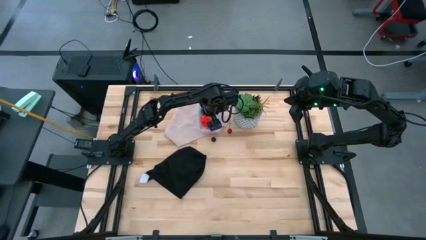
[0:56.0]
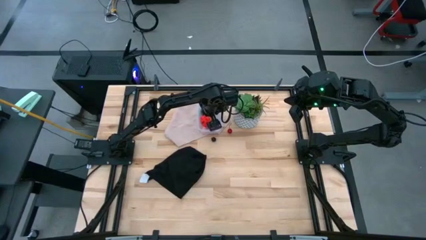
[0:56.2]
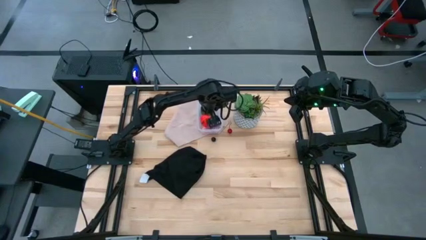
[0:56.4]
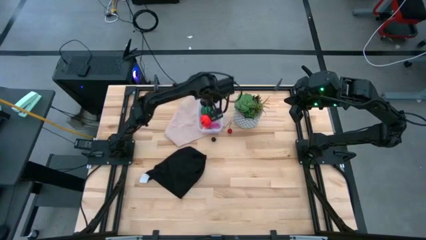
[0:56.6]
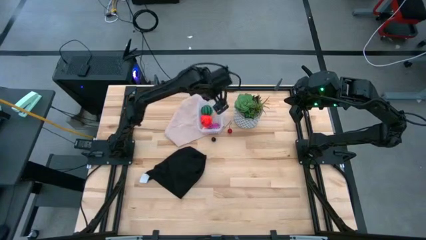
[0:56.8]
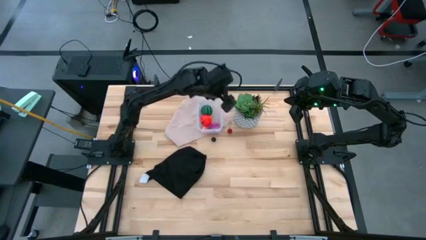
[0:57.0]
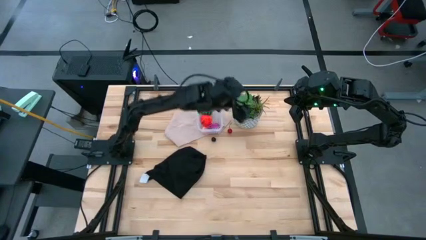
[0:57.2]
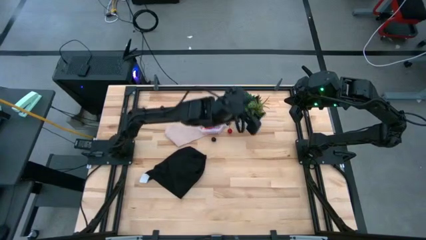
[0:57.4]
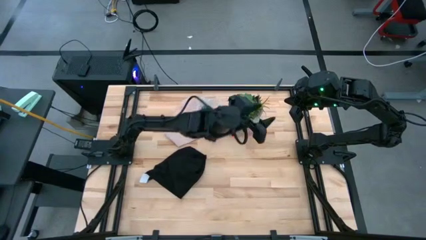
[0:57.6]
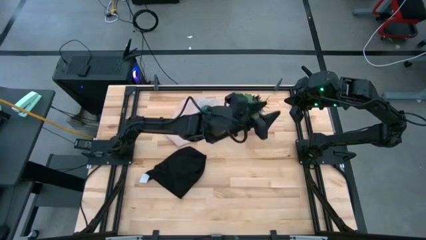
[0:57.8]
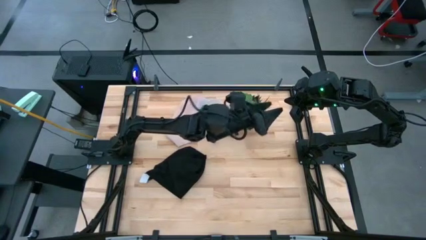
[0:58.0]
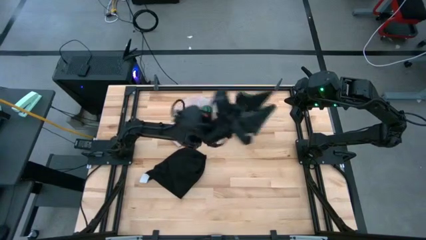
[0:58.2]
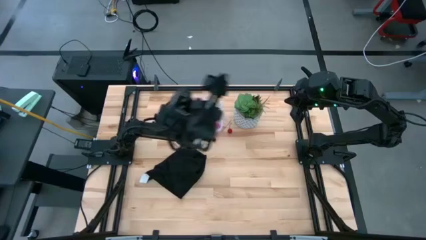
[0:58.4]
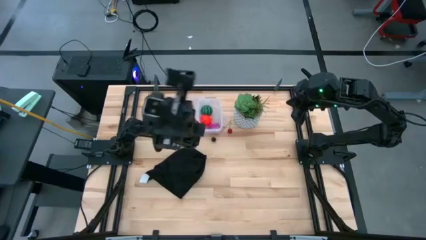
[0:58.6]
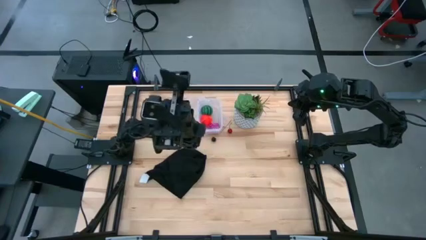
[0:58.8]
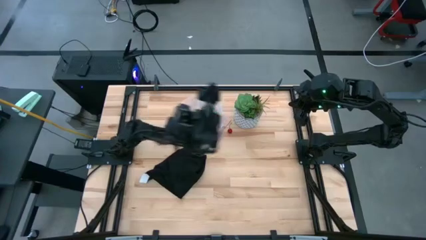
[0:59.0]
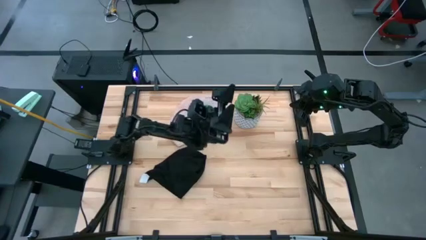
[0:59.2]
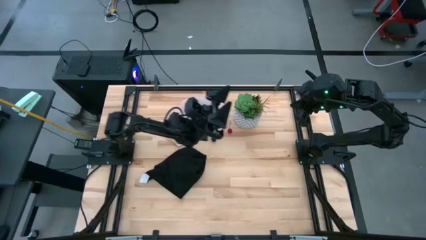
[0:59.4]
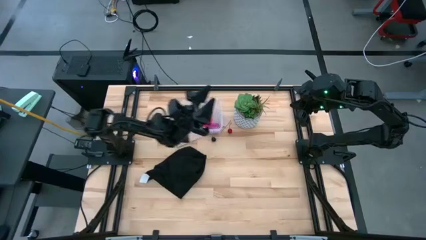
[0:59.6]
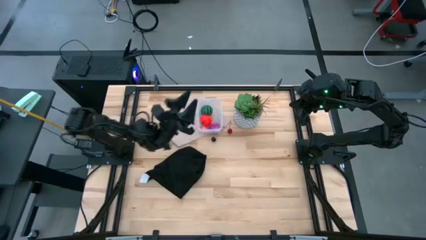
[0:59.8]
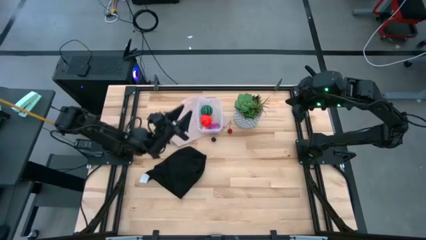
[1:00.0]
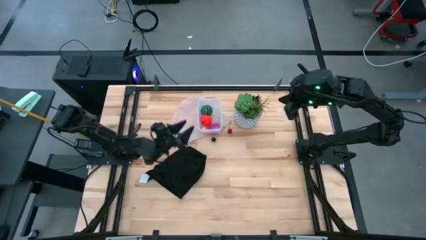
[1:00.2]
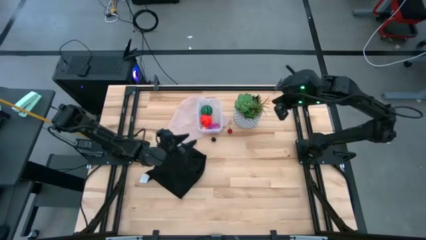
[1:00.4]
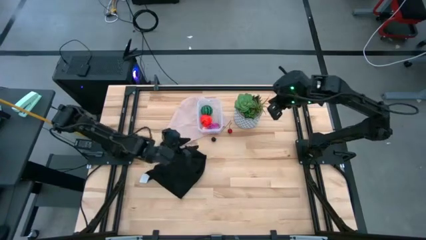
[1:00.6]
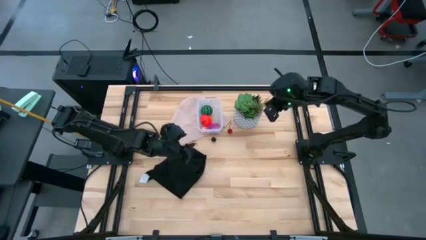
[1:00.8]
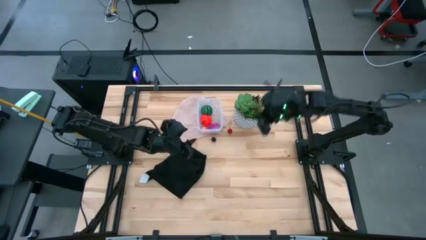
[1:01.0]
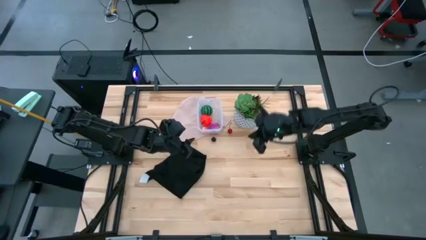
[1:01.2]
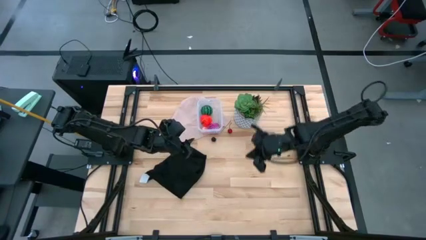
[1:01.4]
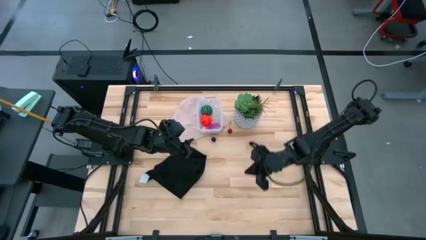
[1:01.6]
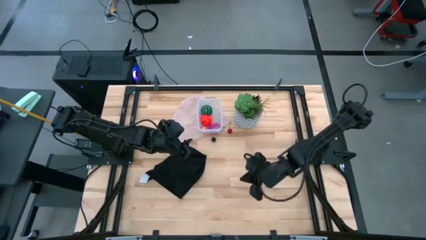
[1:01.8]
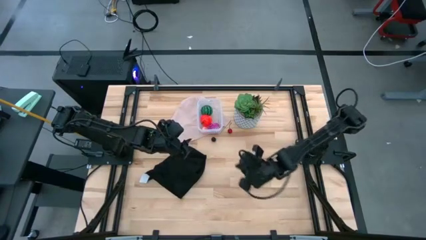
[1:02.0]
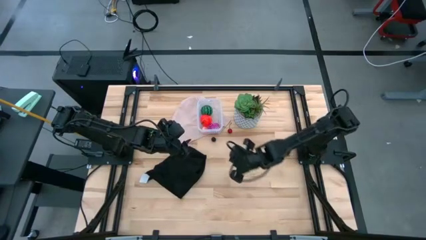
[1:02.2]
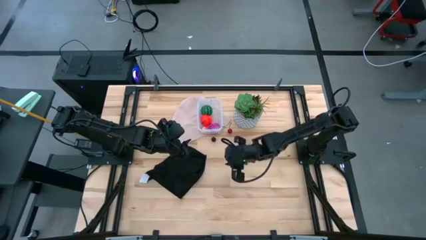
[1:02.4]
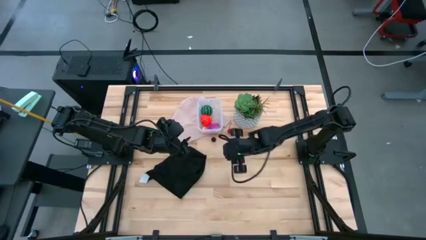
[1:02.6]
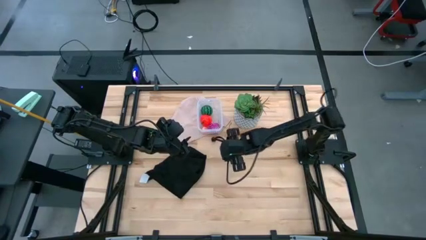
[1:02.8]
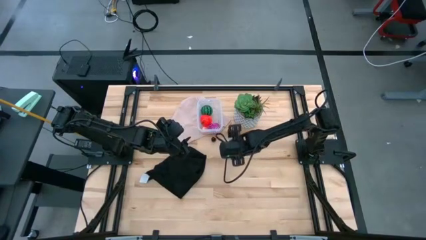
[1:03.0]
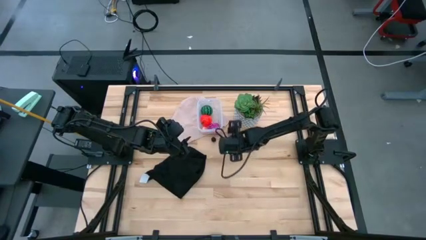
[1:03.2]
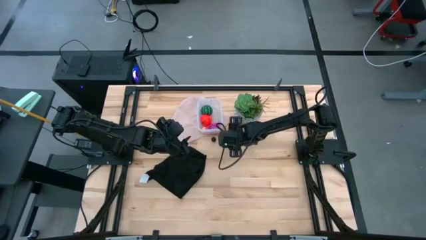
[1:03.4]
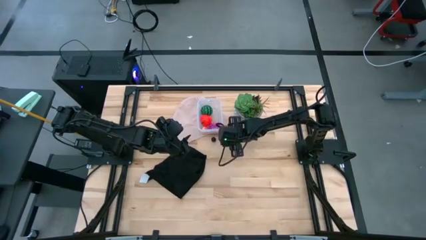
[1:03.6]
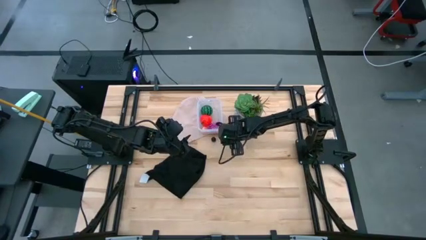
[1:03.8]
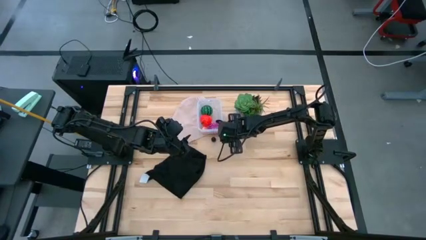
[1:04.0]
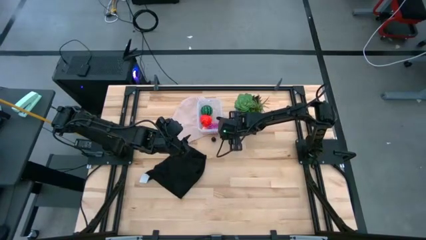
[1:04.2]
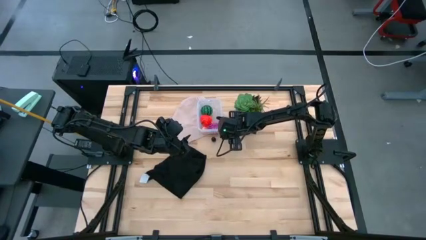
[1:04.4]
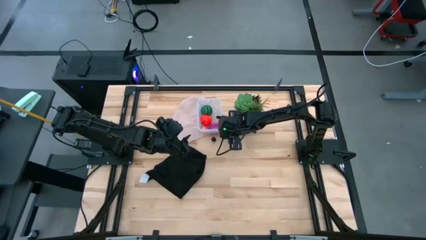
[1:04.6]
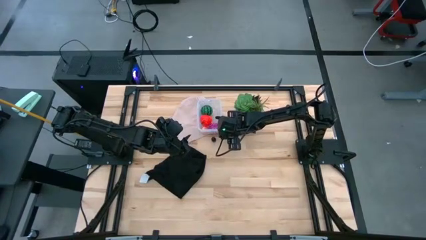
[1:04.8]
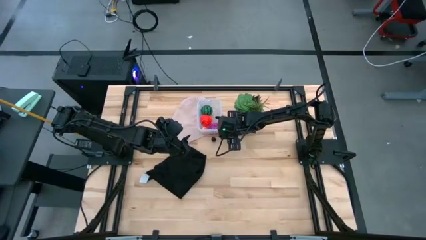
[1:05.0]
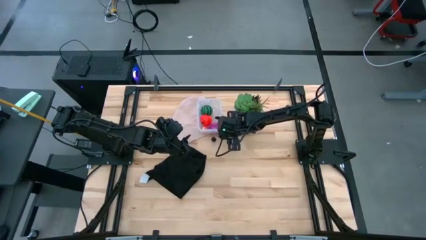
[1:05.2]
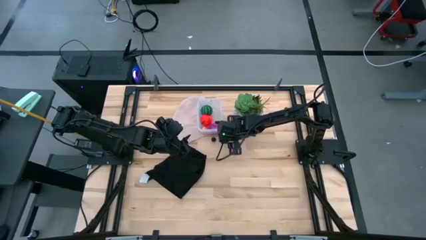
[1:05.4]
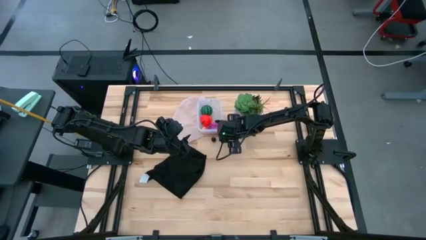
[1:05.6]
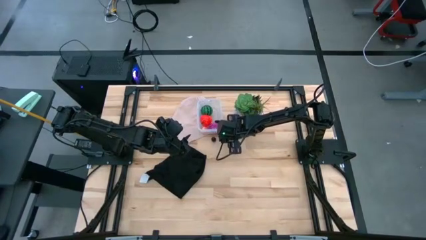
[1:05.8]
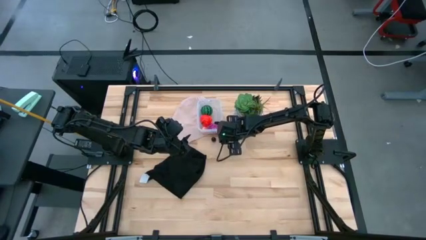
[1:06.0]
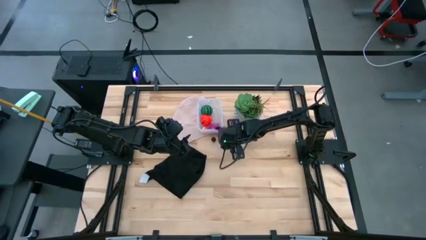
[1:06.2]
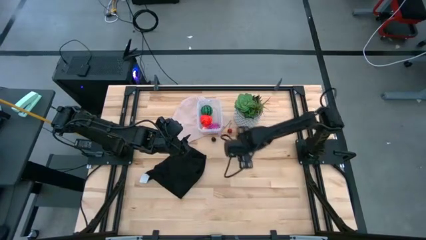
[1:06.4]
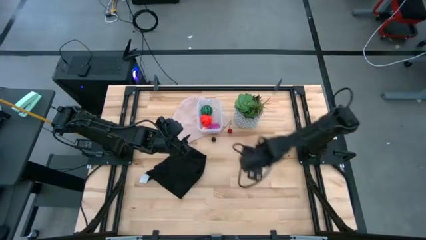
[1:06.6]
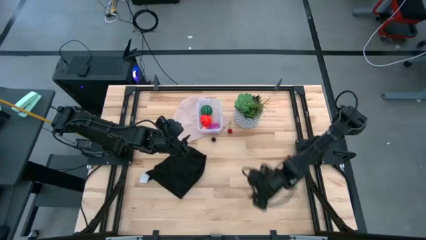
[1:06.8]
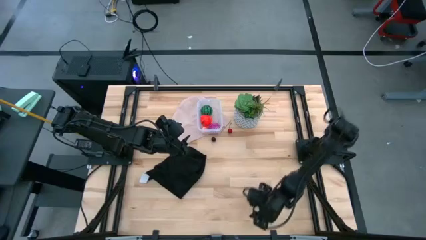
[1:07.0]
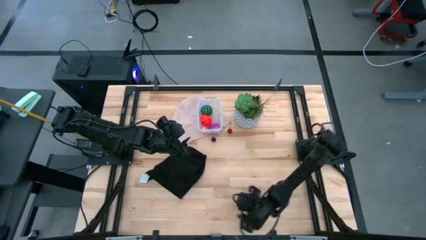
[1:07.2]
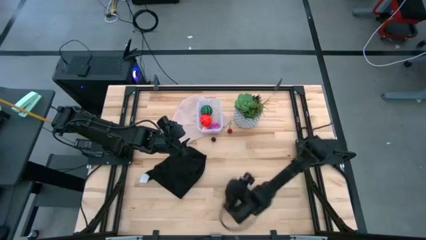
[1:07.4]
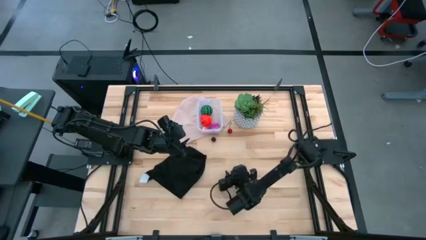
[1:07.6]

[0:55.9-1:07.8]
Task: Pick and placing Produce into tupperware
Put the cherry into the transparent bin

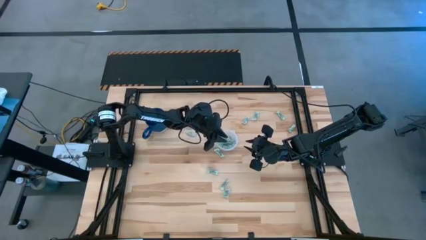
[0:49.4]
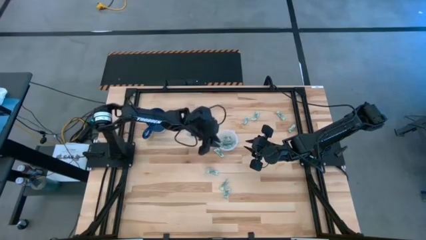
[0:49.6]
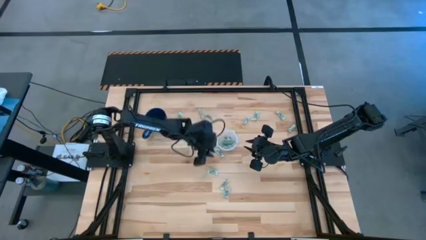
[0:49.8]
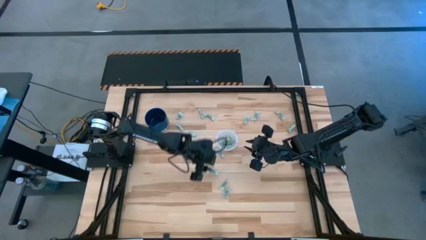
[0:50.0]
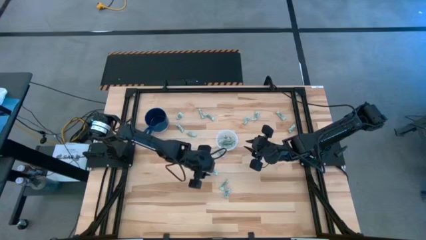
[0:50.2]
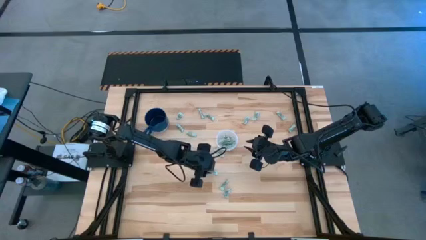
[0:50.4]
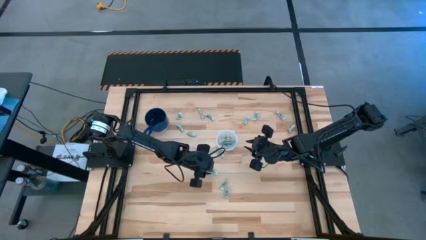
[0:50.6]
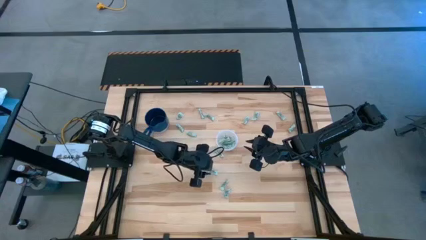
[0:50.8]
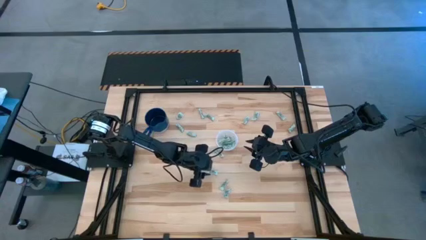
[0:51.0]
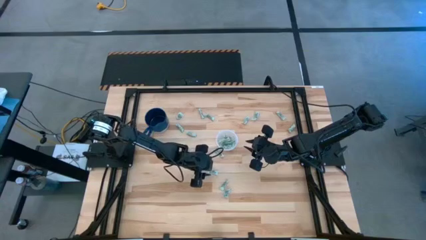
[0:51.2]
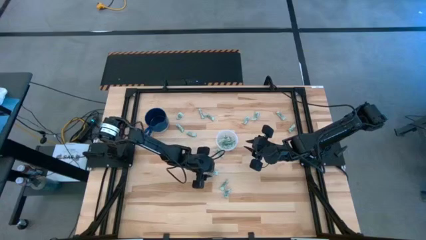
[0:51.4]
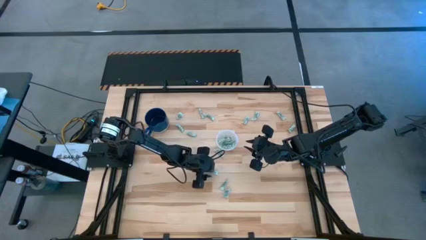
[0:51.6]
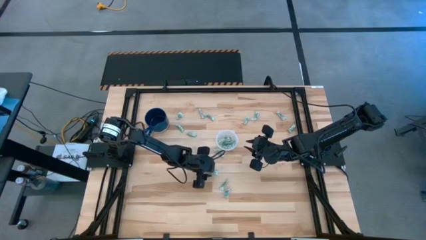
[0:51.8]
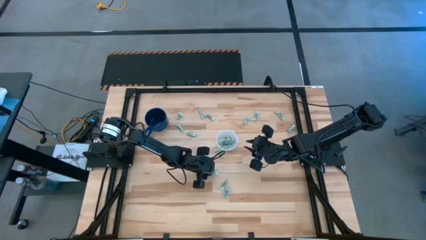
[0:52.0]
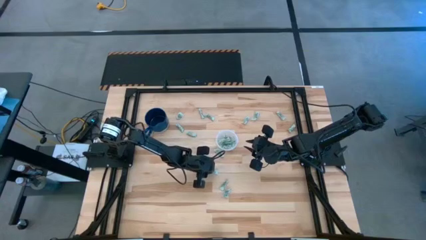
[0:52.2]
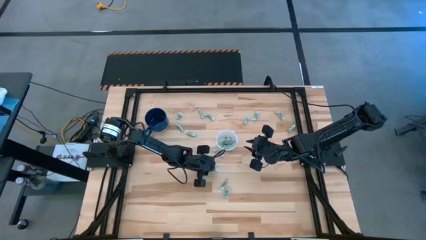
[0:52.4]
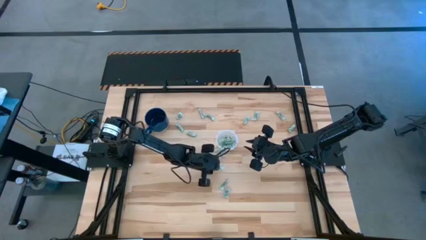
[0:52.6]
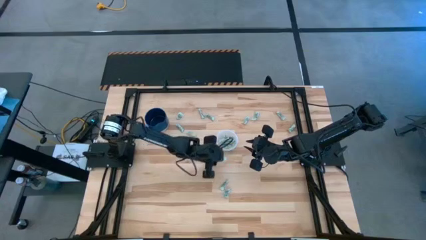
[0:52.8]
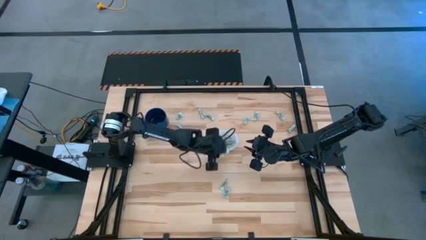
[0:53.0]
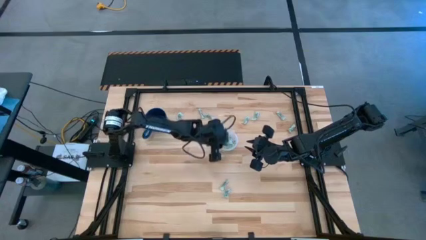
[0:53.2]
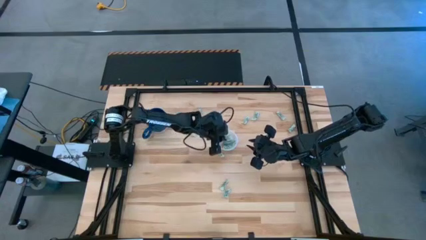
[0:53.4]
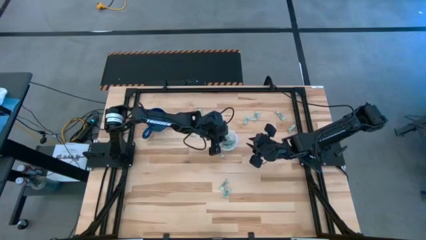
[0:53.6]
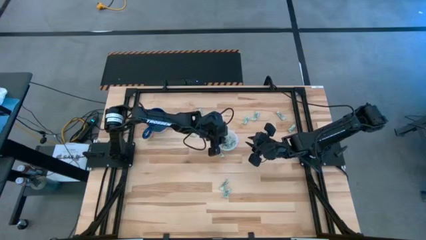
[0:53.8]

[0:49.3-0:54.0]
Task: Pick and place items into bin
Put the gray stevia packet into the transparent bin
